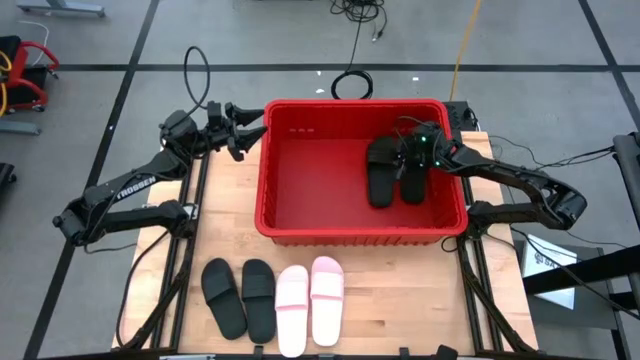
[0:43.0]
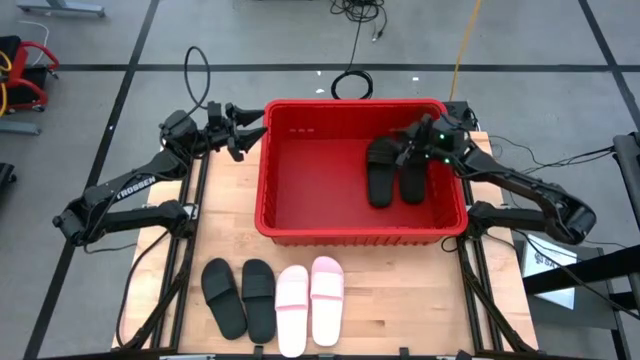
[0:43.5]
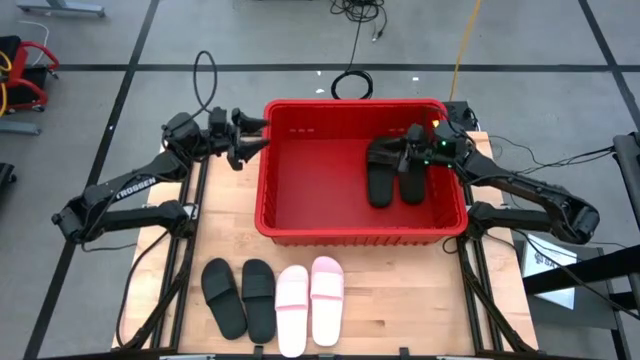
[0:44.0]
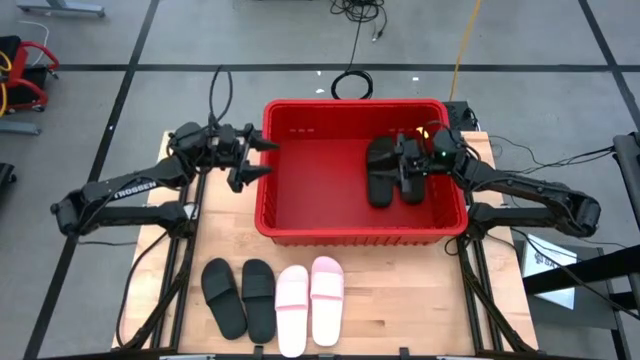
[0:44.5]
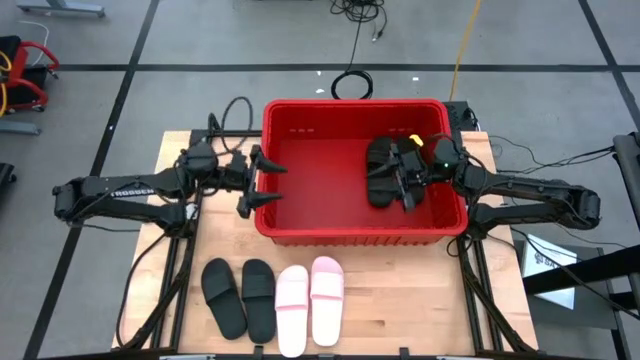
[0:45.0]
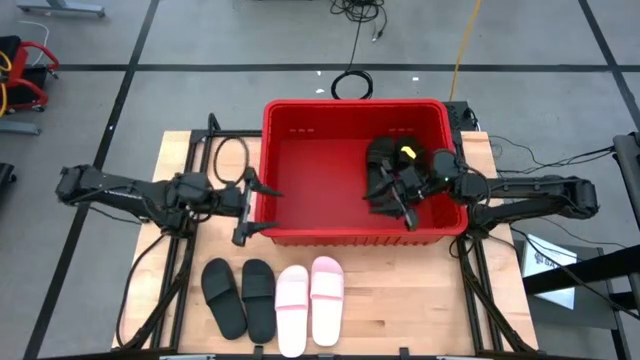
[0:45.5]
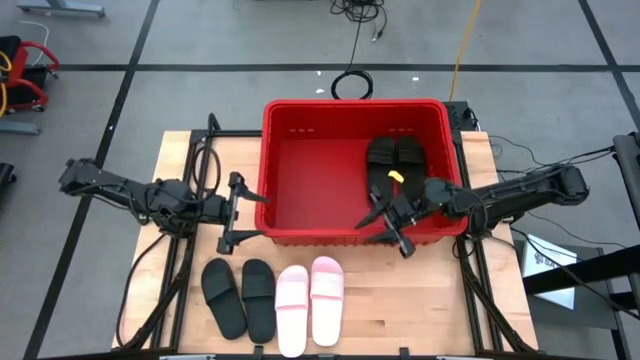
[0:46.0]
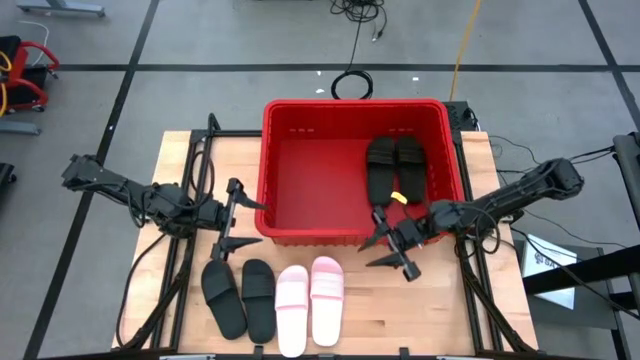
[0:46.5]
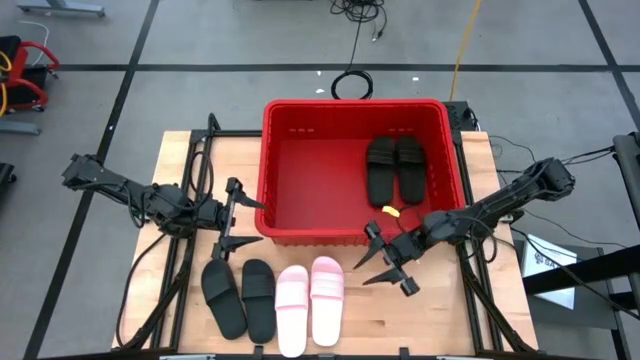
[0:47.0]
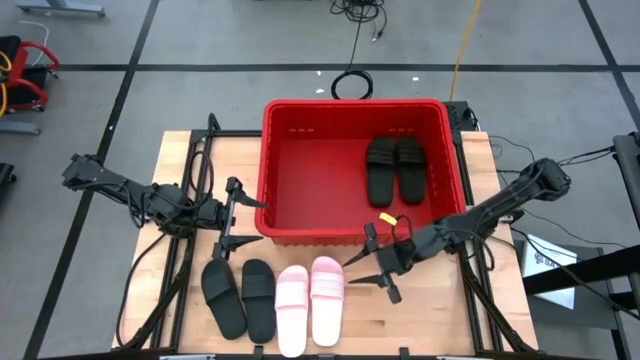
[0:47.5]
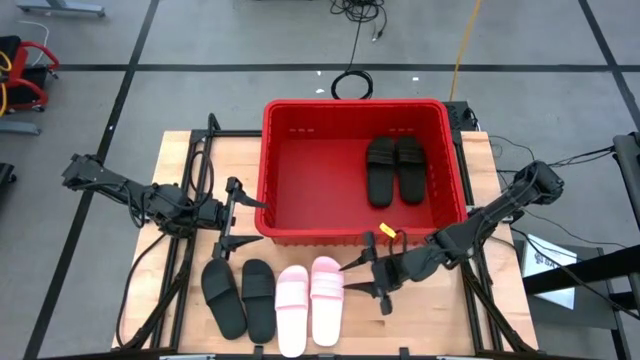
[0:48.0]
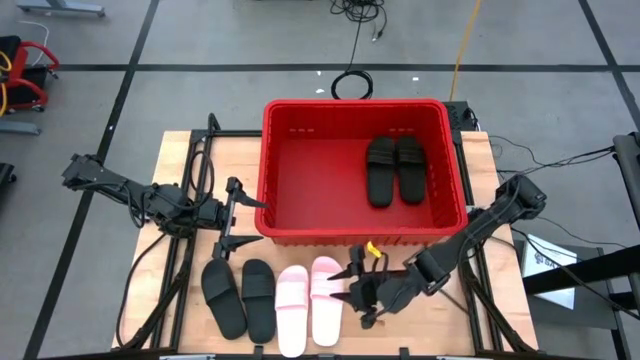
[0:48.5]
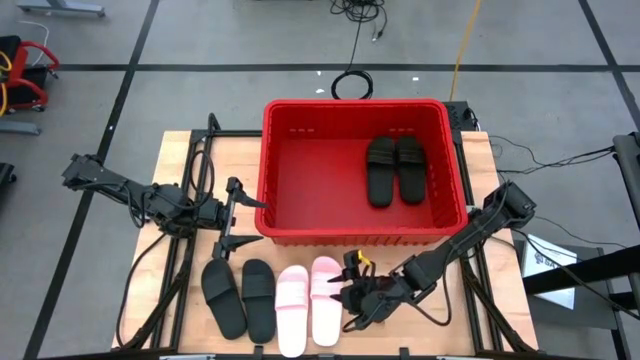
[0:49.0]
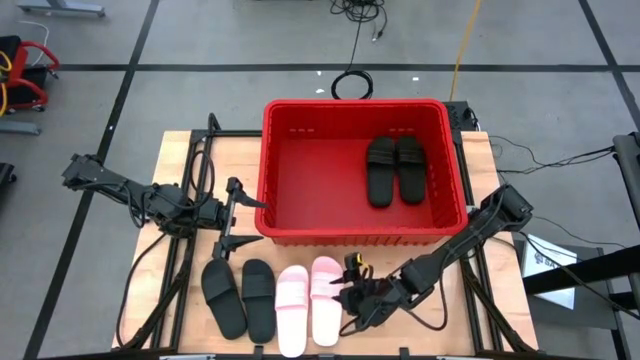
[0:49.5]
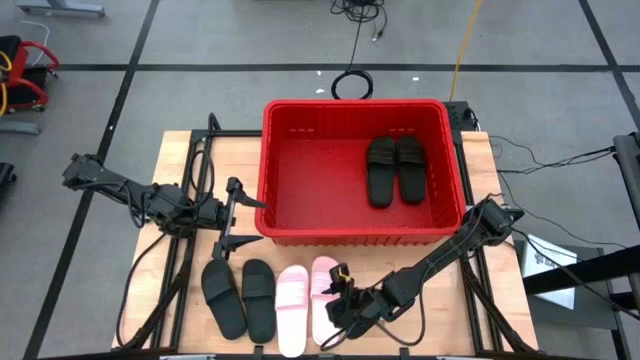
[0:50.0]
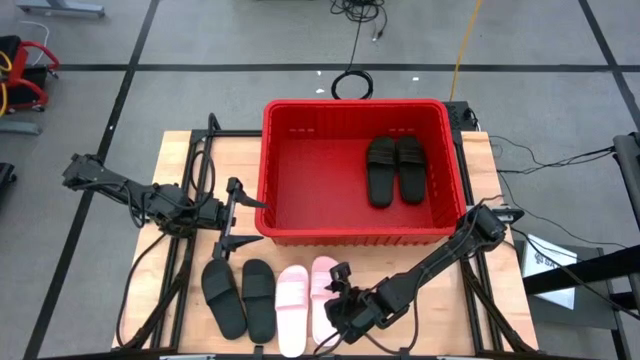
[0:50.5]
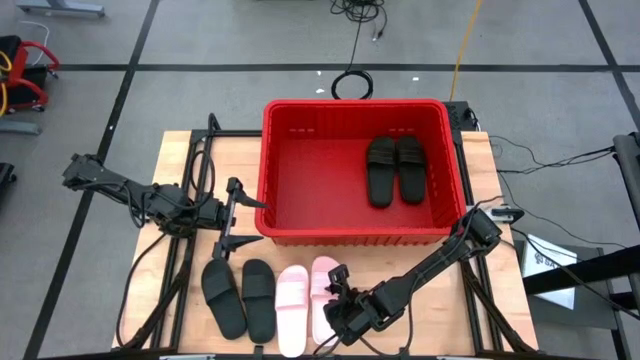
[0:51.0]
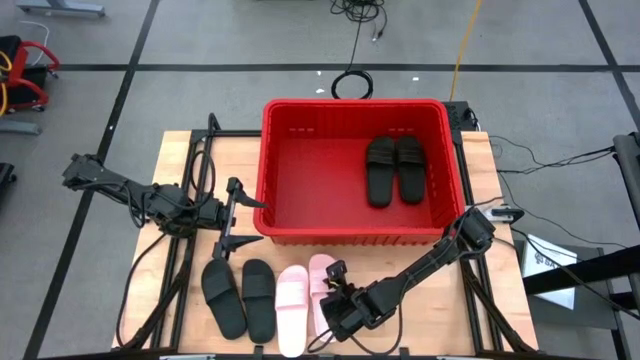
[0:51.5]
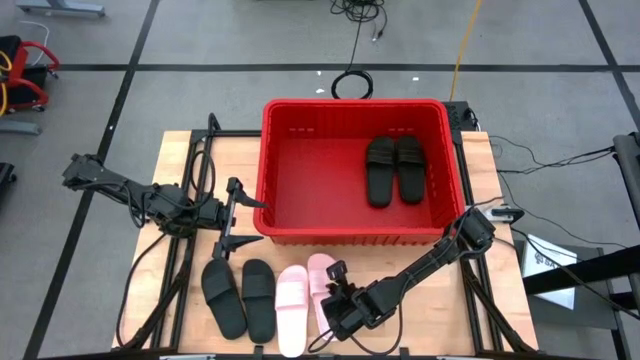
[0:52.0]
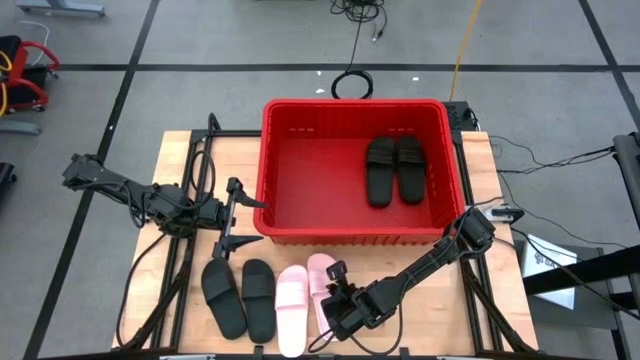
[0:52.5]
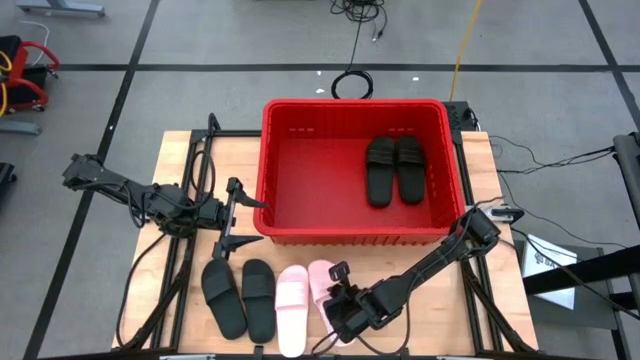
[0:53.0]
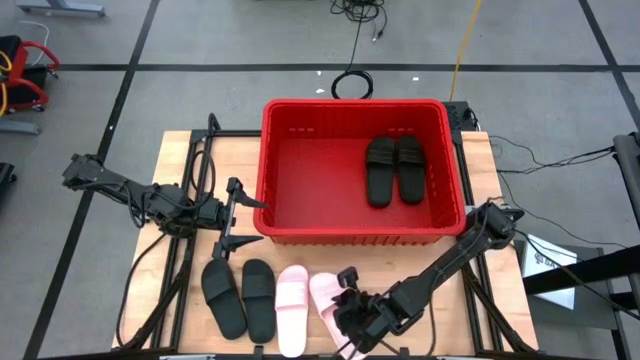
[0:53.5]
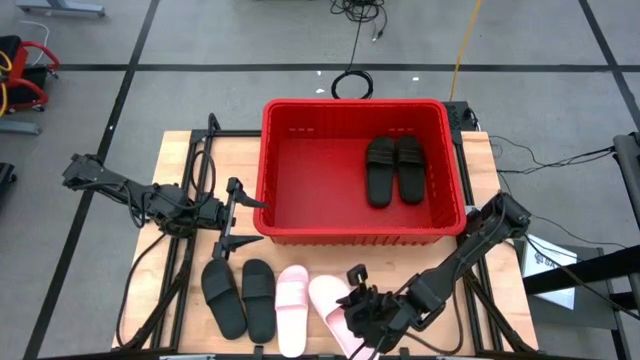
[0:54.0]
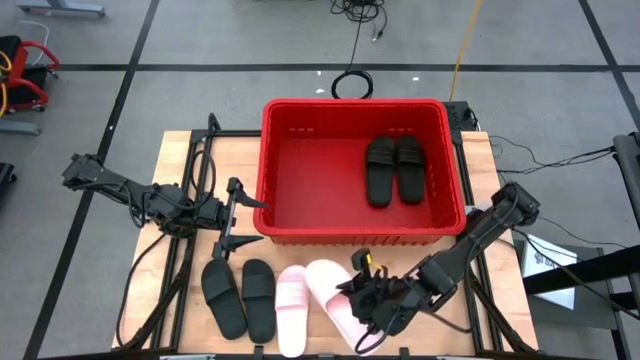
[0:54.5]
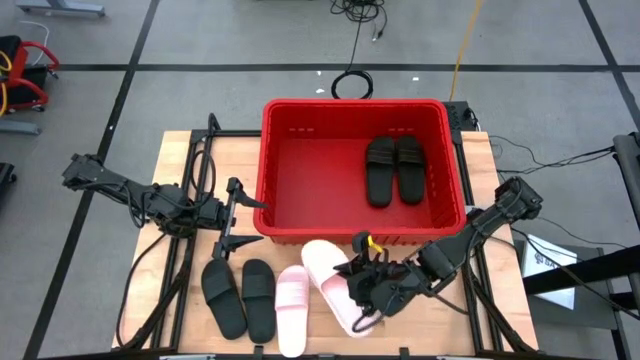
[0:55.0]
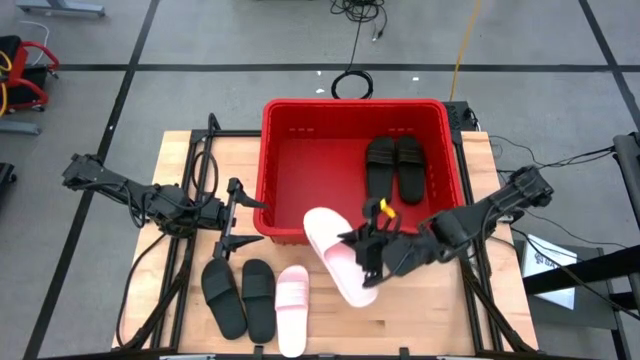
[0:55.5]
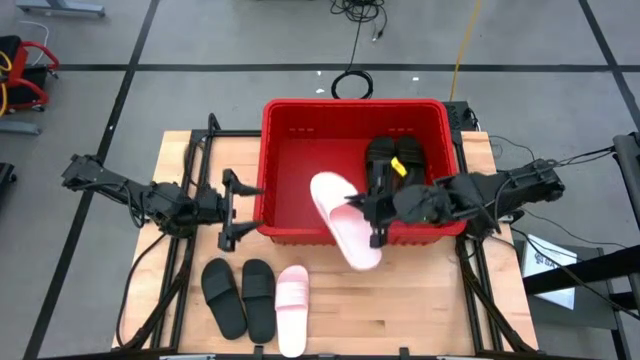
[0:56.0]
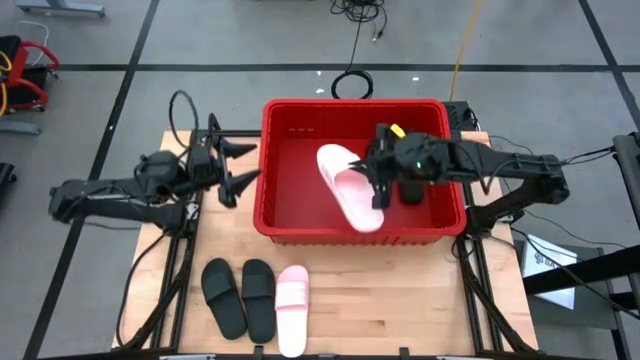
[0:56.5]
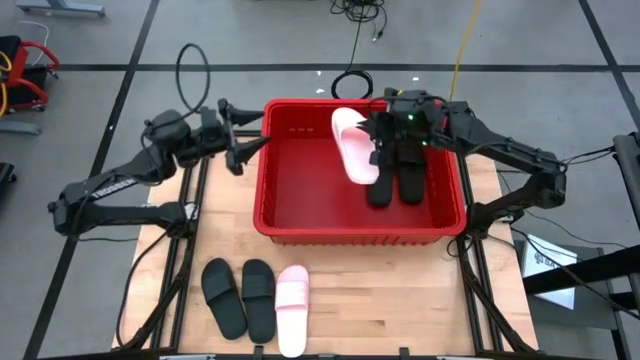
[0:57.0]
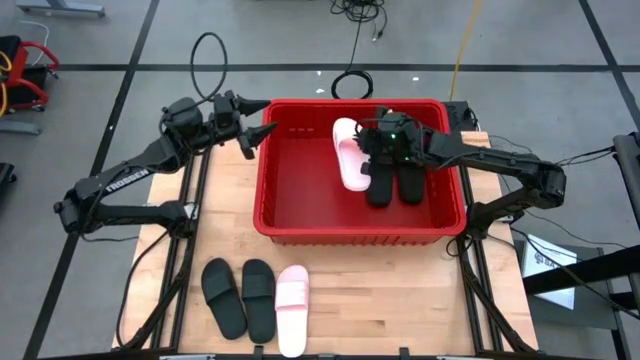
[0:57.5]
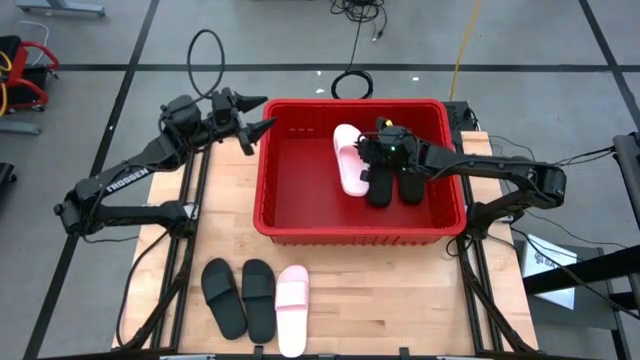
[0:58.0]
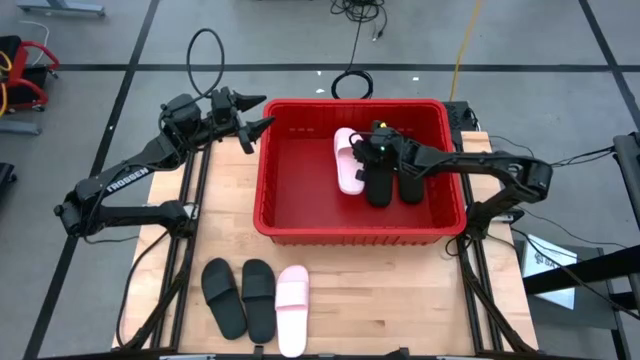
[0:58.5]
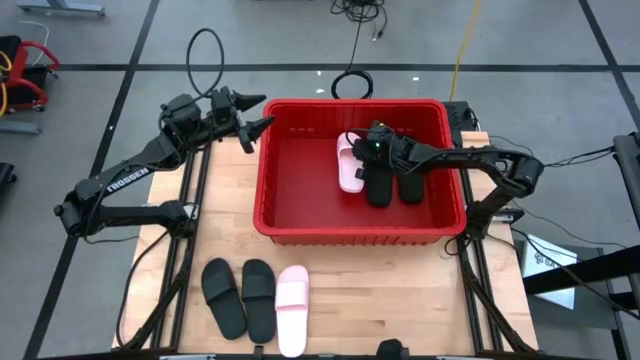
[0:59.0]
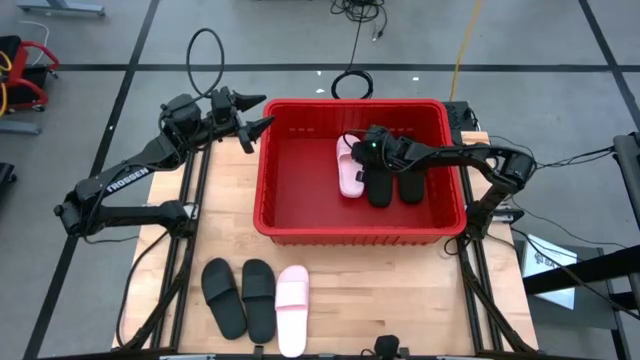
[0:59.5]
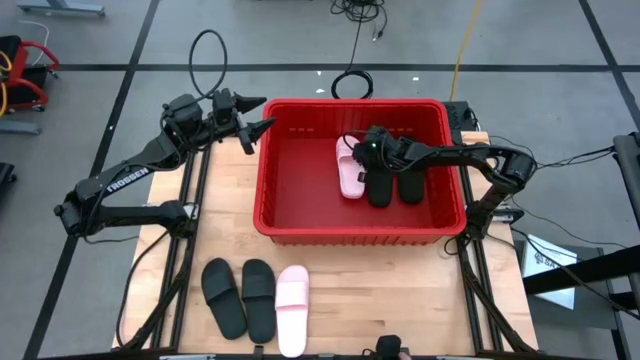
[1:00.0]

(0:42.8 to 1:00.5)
Task: Pick and place slides into bin
Put the pink slide into the red basket
